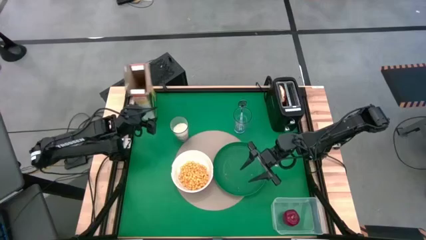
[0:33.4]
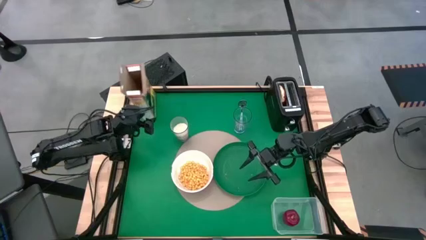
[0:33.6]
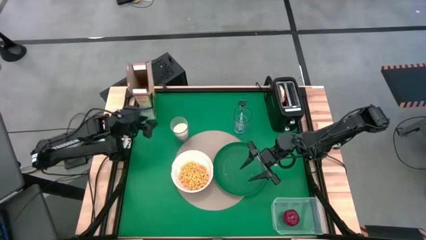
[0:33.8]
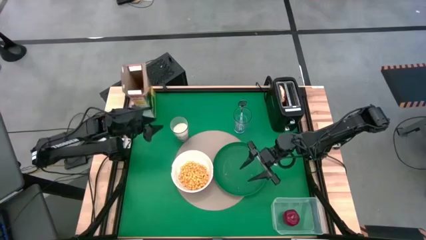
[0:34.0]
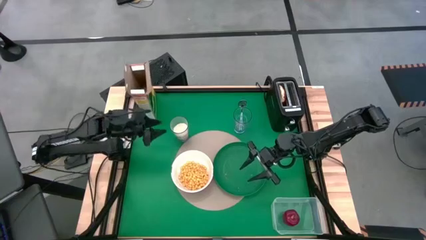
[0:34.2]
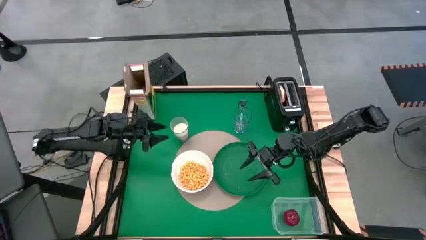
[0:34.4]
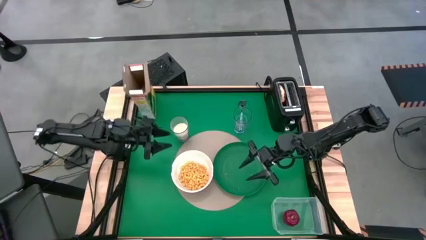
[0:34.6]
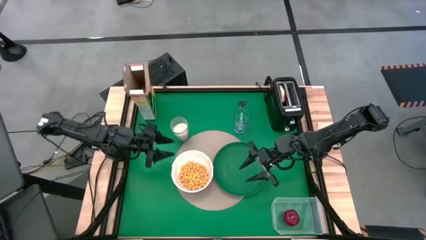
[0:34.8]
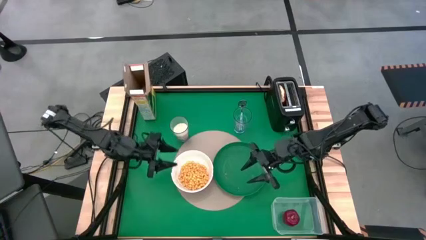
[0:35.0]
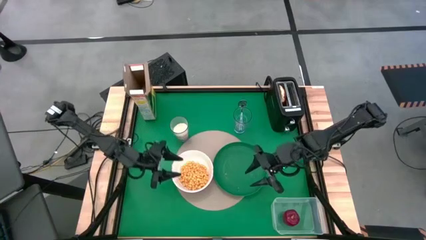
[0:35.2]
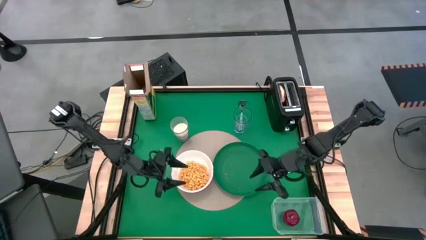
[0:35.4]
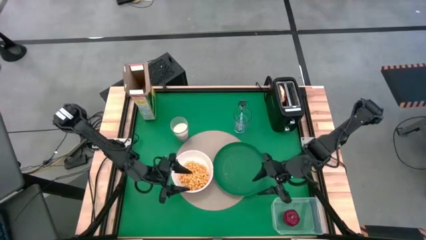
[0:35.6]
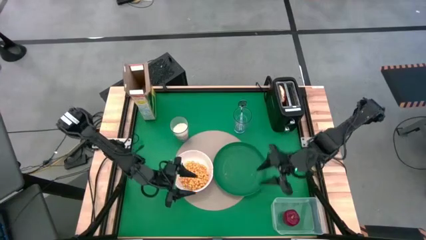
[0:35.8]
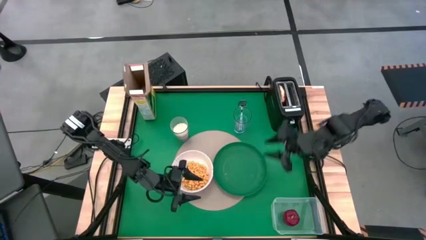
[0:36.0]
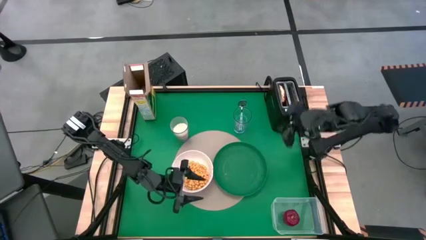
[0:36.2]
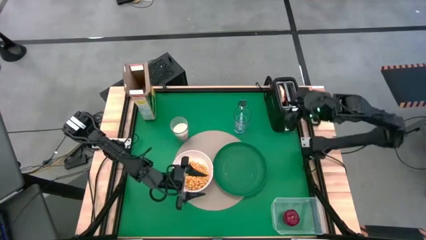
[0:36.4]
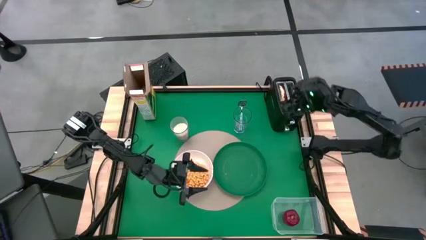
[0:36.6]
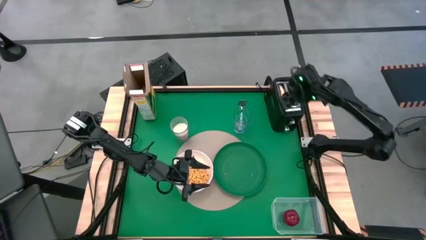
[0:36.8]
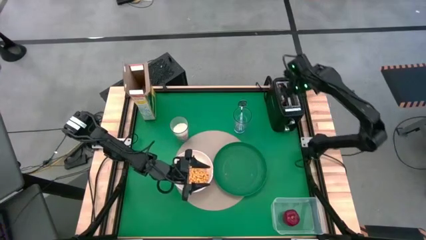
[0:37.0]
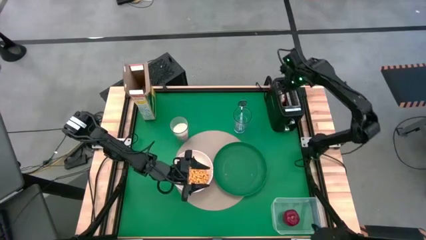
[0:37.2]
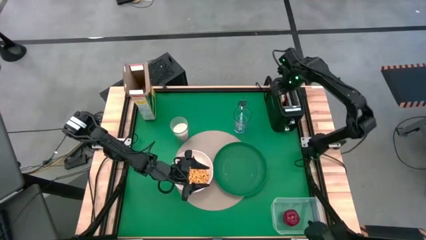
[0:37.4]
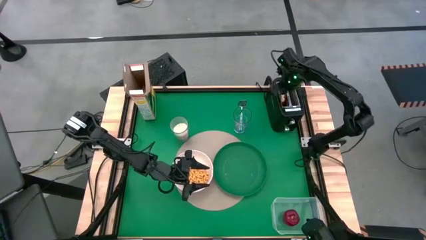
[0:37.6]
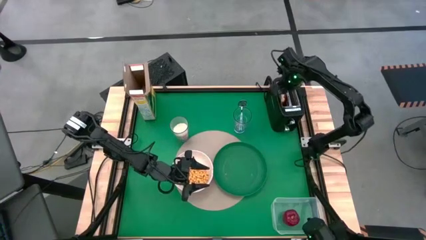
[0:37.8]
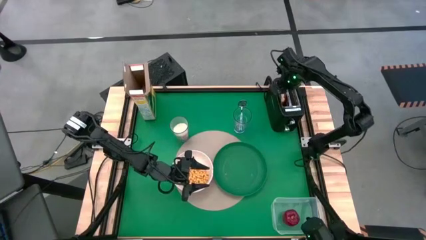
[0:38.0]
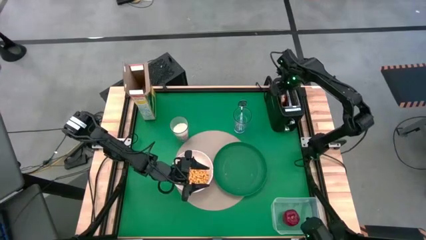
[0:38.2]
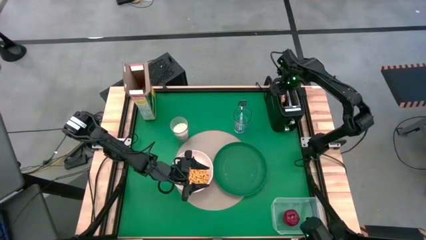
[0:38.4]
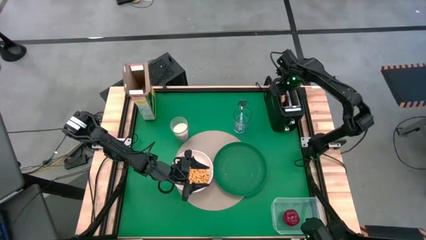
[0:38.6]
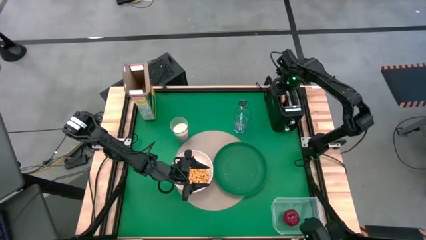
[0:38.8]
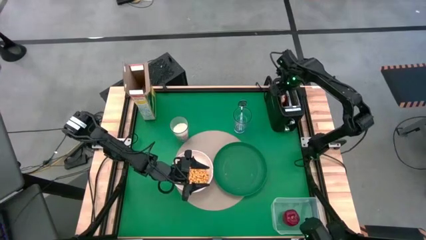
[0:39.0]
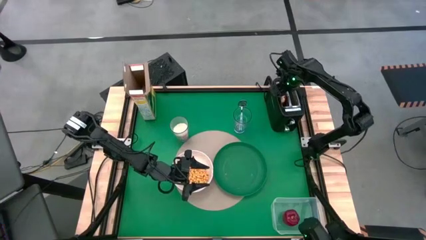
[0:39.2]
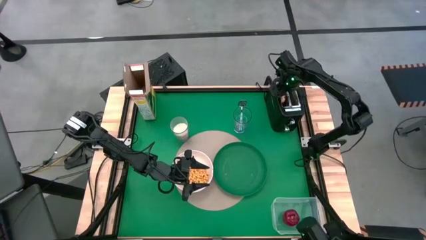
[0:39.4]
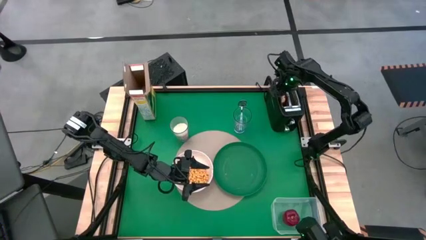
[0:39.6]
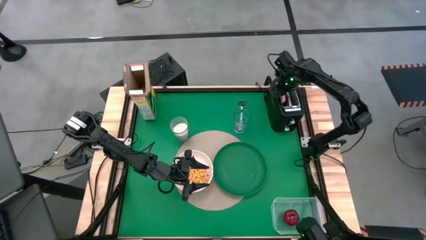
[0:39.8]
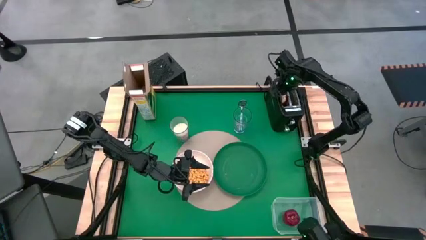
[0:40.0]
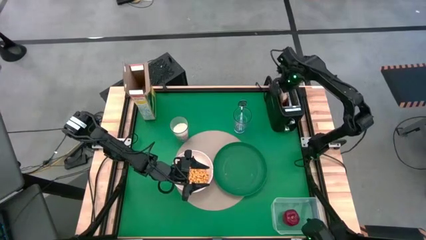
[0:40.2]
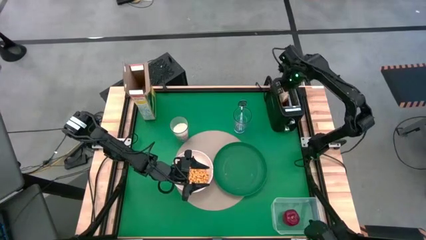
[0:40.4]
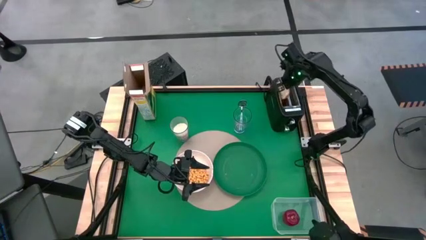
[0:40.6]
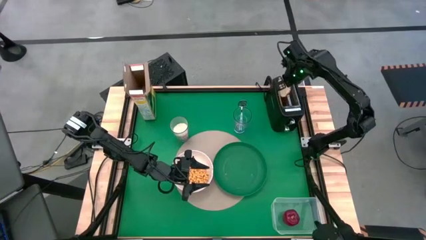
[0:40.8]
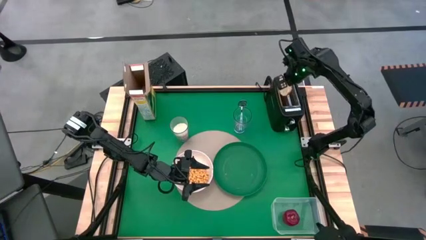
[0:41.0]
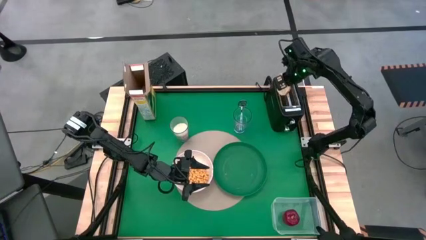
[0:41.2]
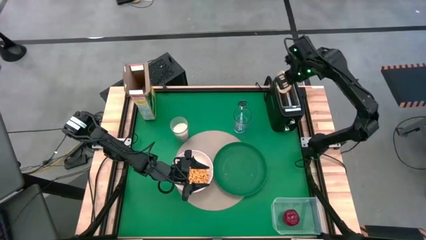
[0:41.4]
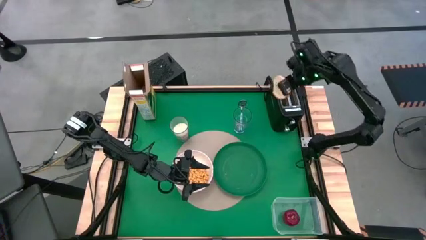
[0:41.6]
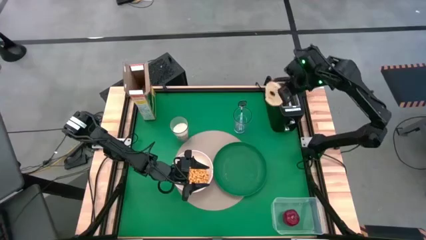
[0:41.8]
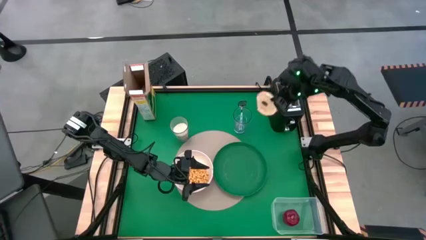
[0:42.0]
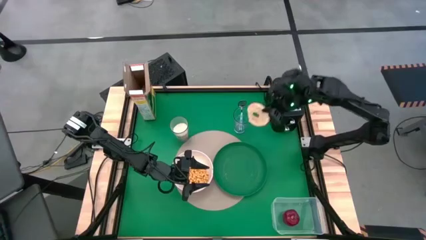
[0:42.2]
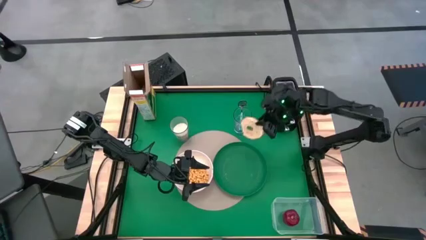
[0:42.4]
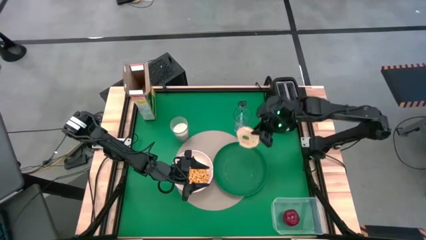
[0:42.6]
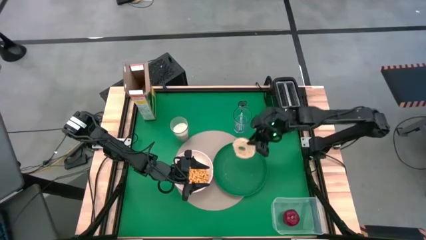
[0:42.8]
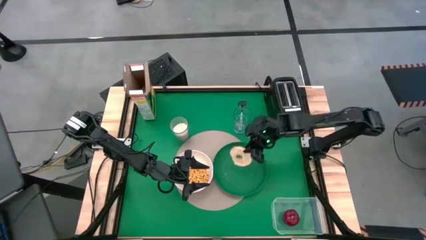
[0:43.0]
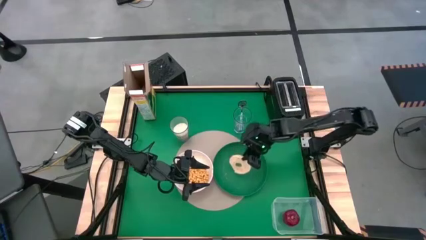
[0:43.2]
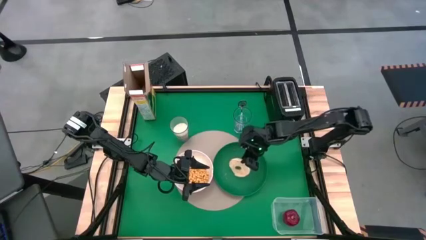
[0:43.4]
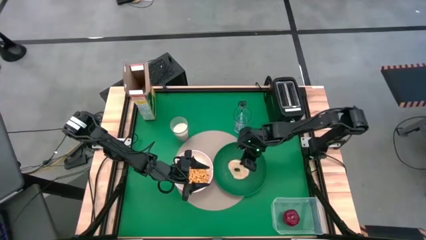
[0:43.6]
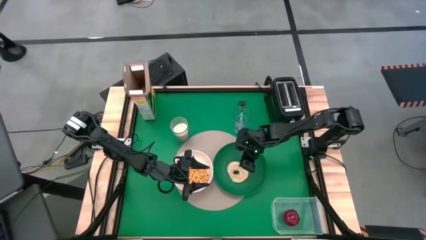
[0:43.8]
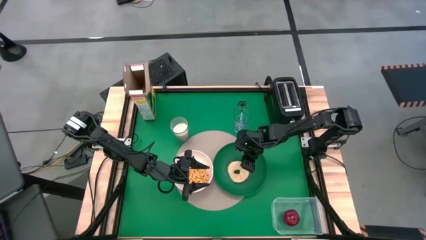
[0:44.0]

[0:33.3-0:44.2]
Task: Arrange a breakfast setting
Put the bagel on the green plate
